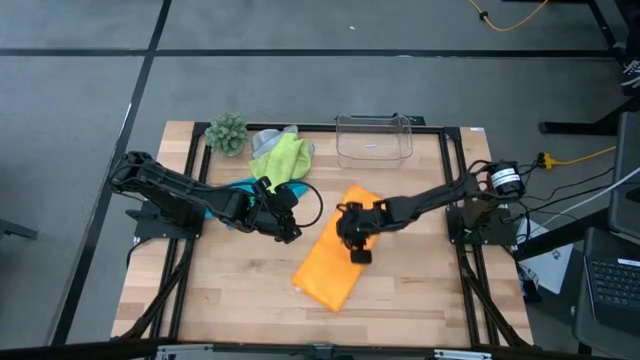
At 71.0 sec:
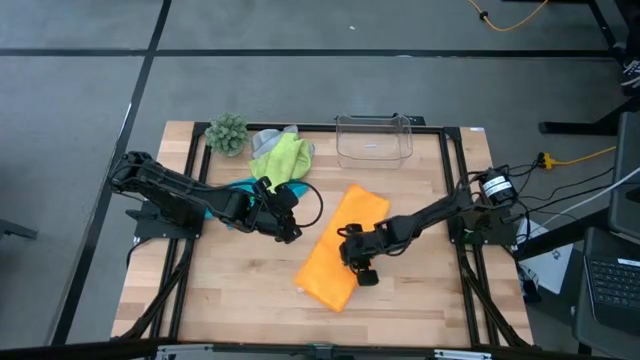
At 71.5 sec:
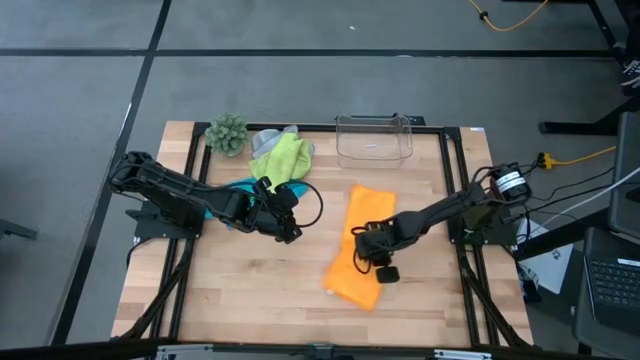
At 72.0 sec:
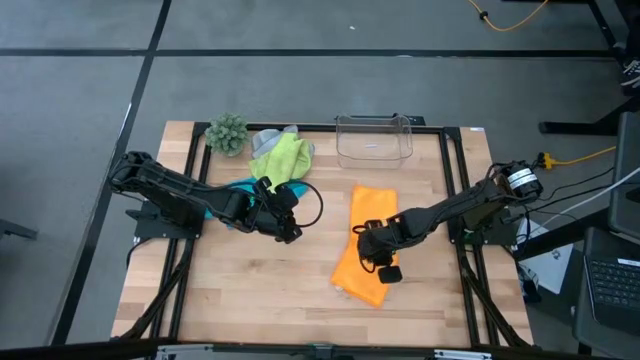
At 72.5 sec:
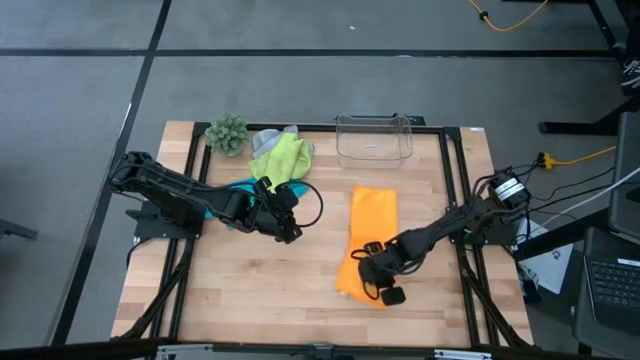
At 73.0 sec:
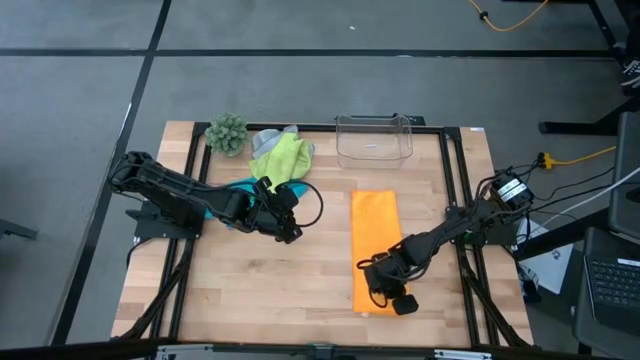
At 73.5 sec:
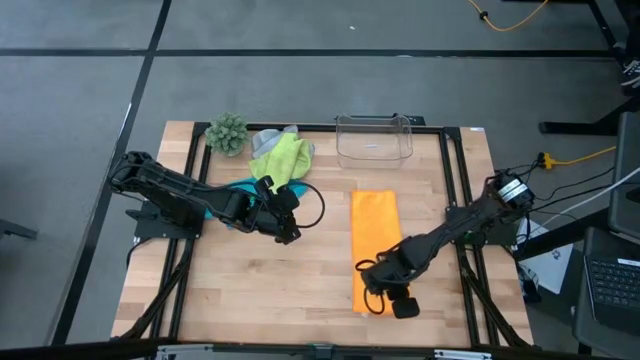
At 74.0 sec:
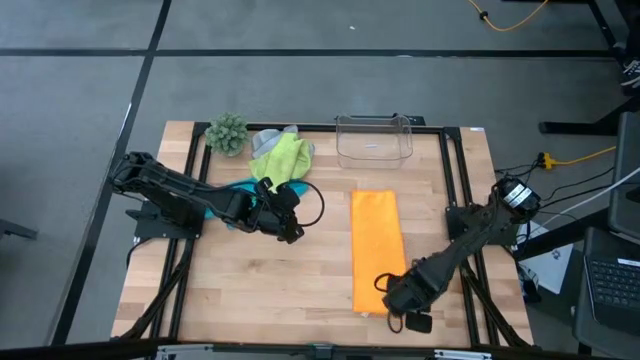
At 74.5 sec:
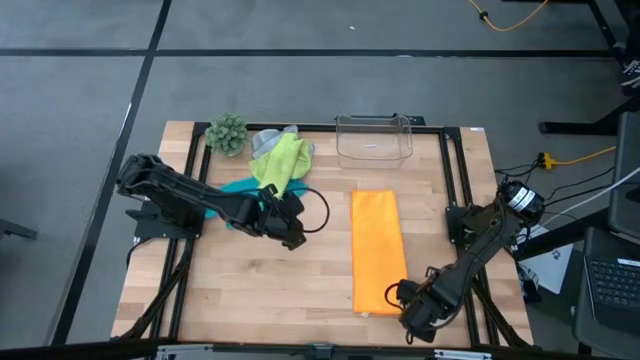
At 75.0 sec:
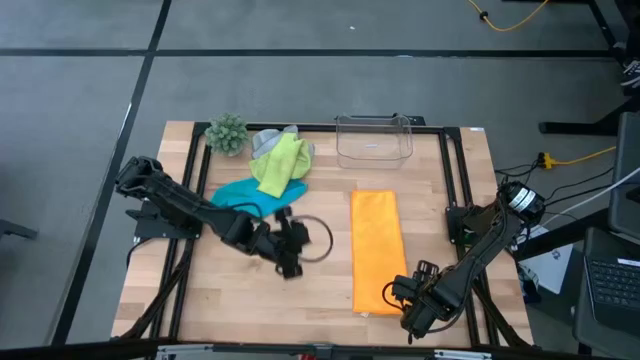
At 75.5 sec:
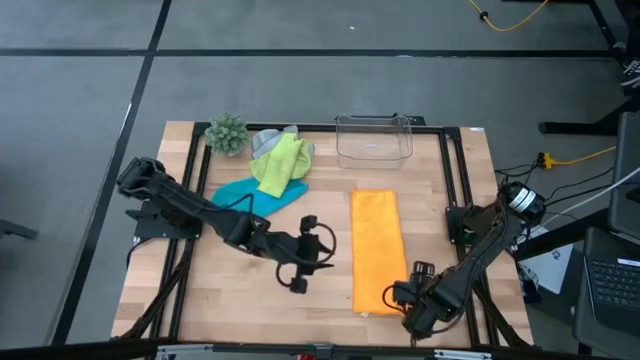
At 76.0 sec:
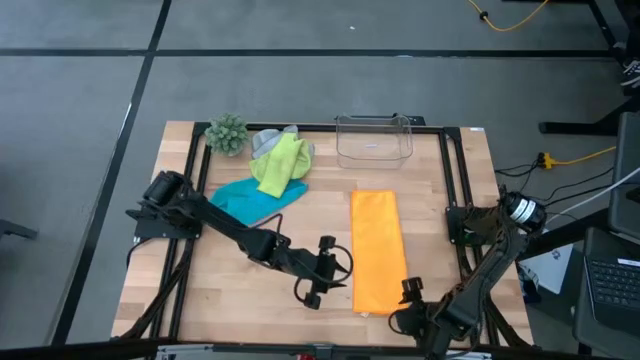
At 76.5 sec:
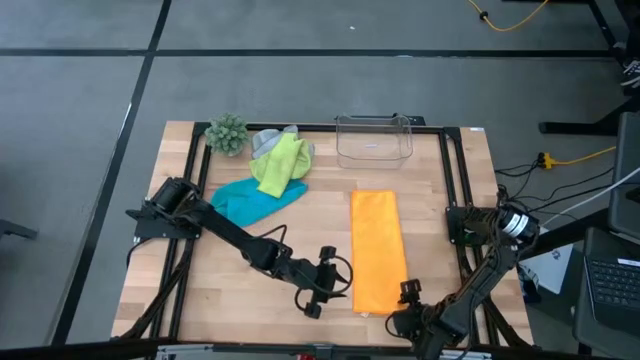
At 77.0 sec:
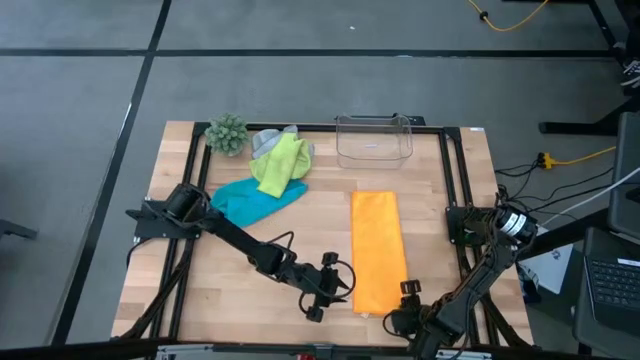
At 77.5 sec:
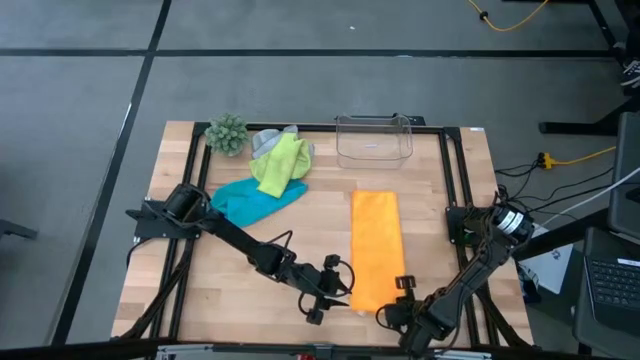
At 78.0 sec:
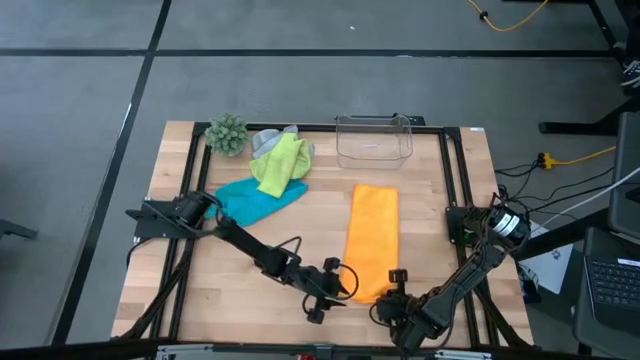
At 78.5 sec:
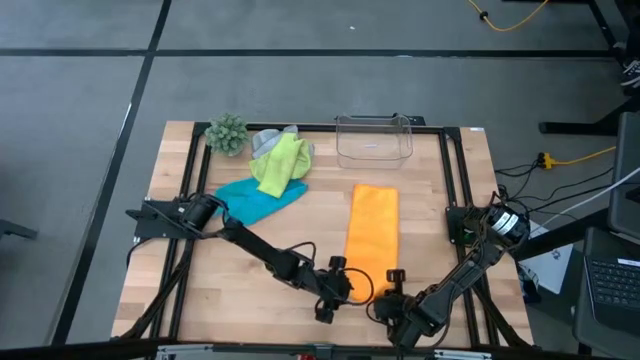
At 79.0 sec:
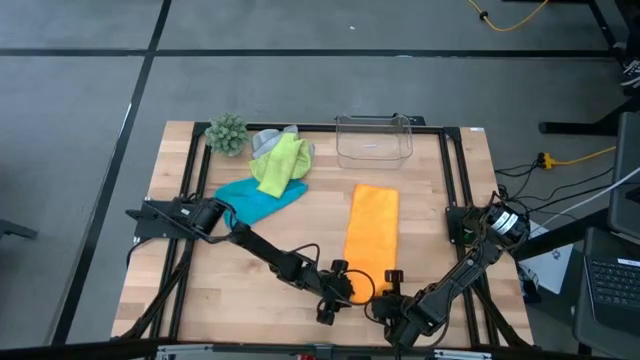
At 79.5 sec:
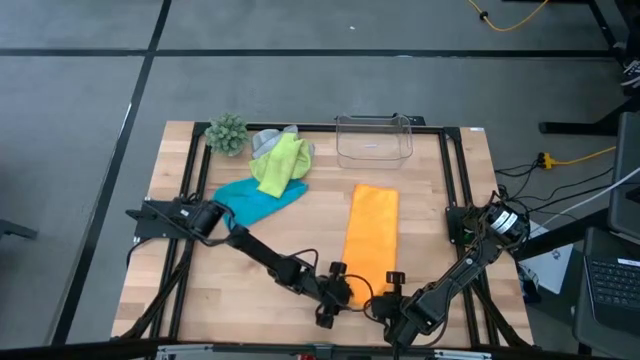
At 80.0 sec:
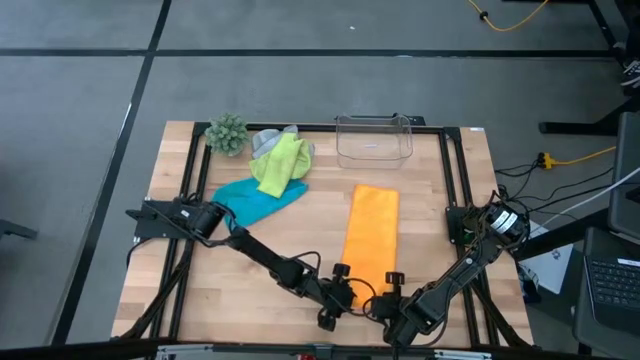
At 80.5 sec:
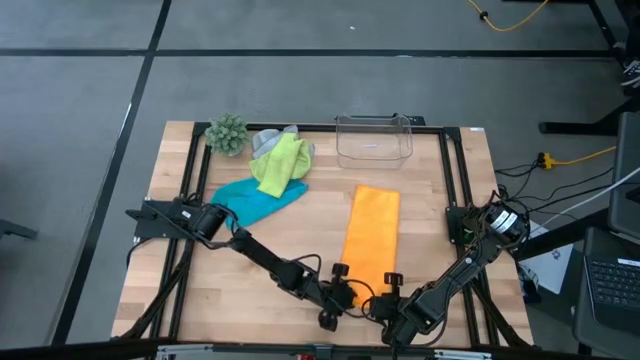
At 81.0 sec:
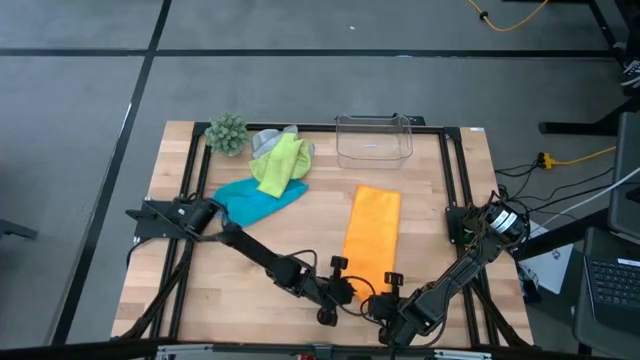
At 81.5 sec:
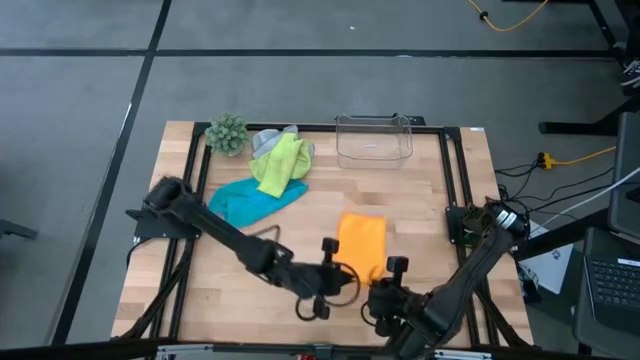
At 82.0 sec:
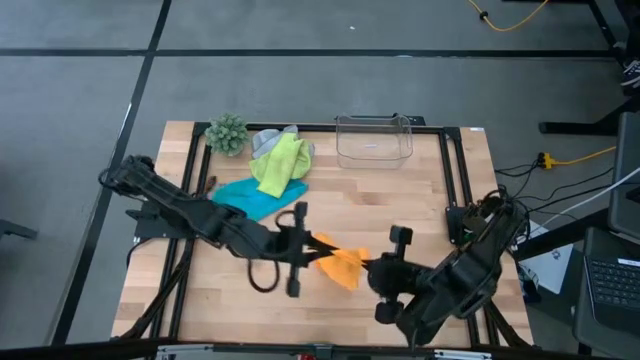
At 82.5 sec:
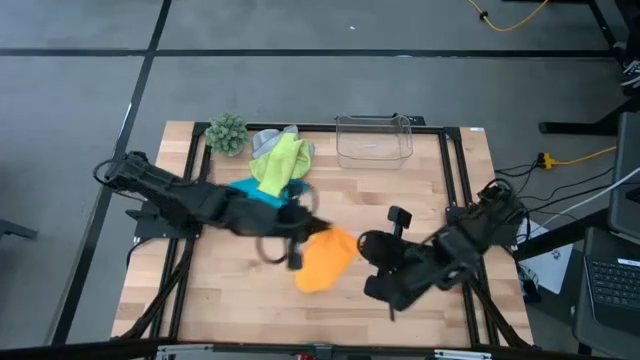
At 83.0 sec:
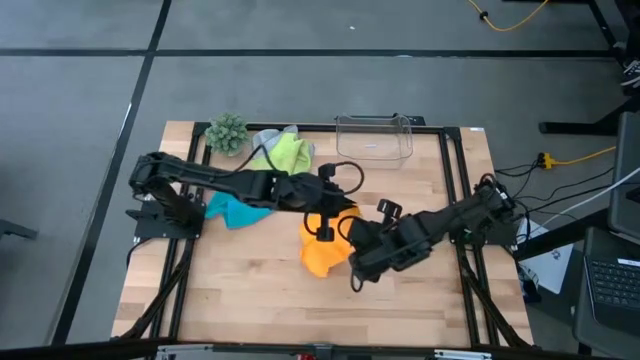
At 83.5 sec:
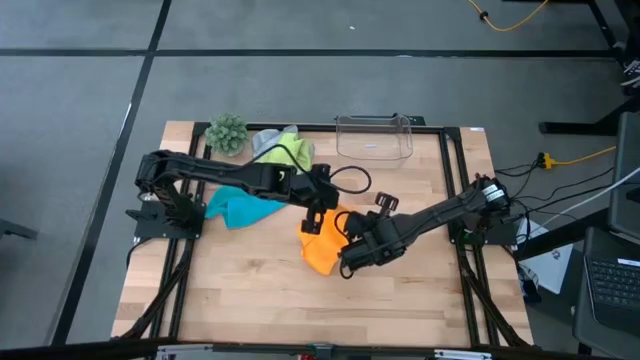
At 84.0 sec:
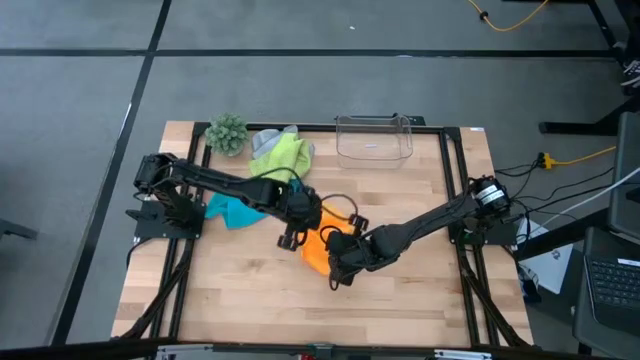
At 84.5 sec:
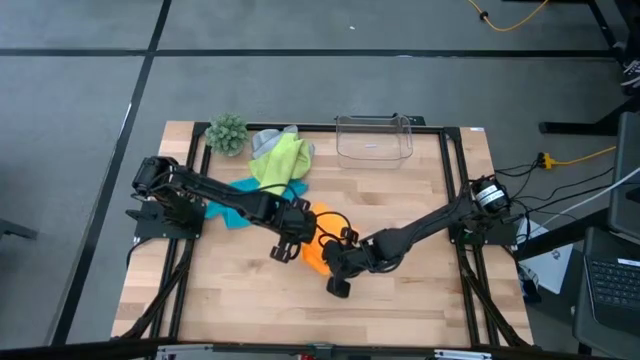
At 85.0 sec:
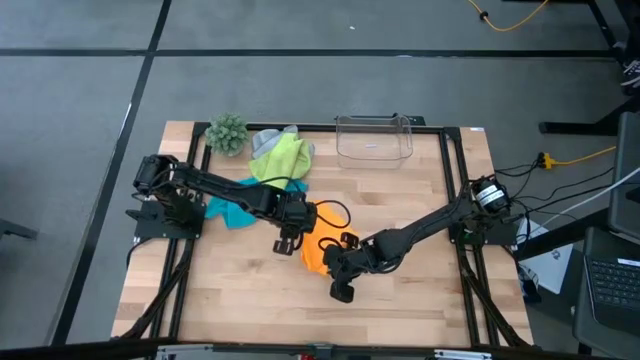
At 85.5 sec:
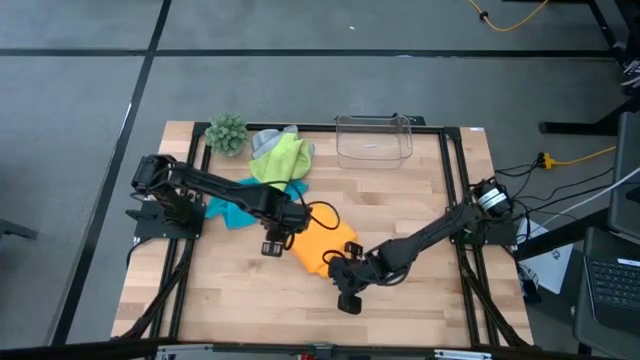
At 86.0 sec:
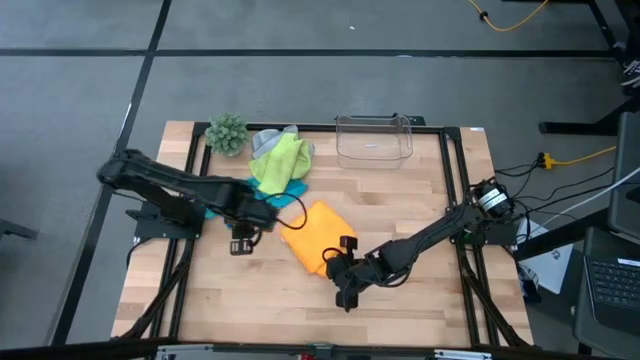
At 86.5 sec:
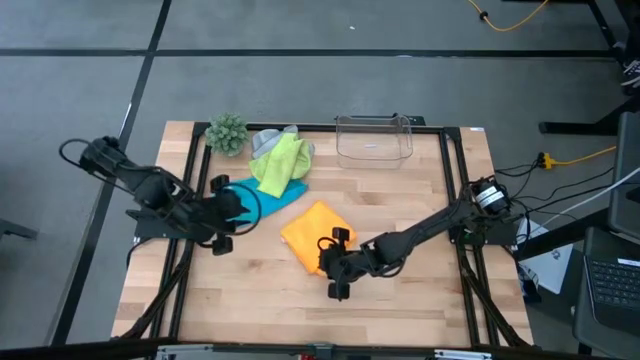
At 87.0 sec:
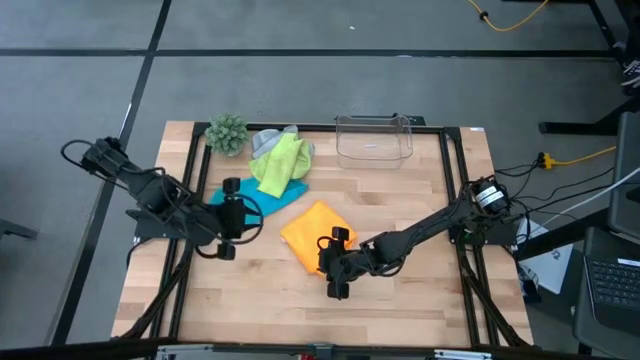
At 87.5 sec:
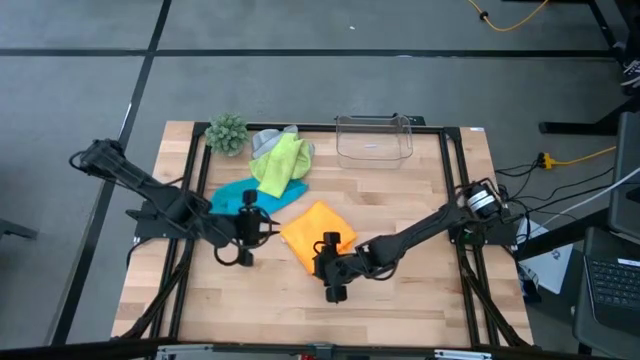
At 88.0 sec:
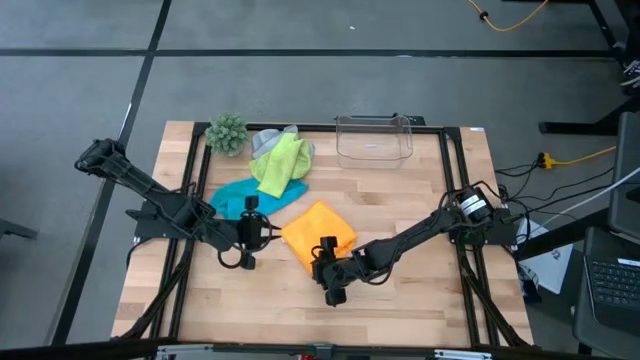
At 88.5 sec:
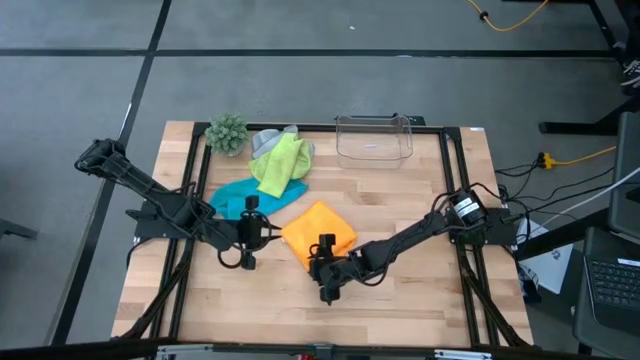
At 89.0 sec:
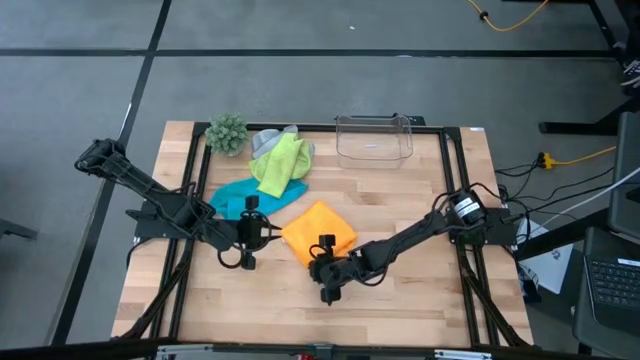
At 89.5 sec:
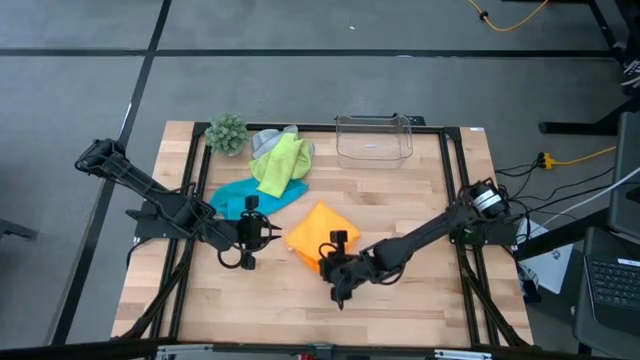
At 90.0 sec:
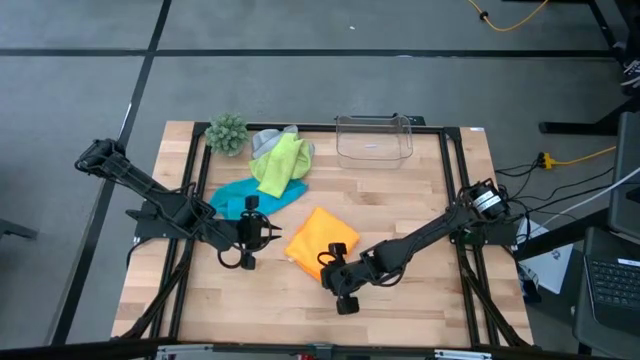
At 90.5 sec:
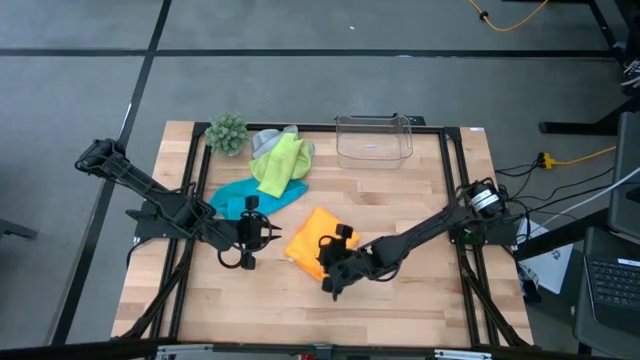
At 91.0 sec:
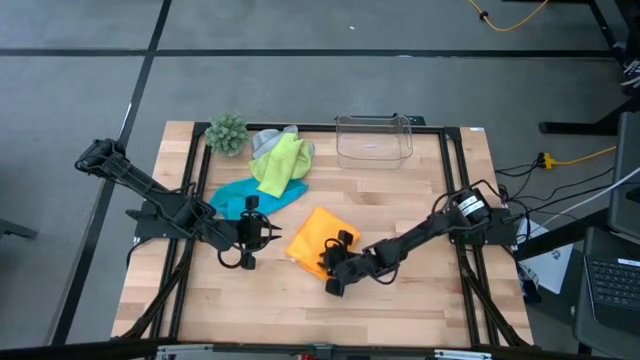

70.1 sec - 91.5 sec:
Task: Fold microfiber towels
Fold the orange microfiber cloth
